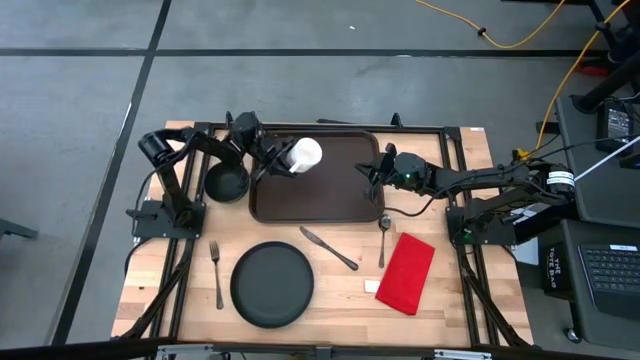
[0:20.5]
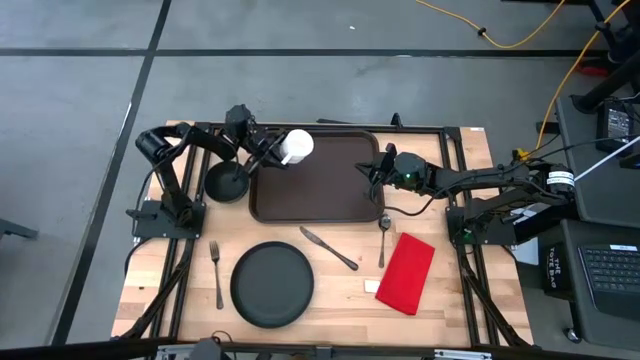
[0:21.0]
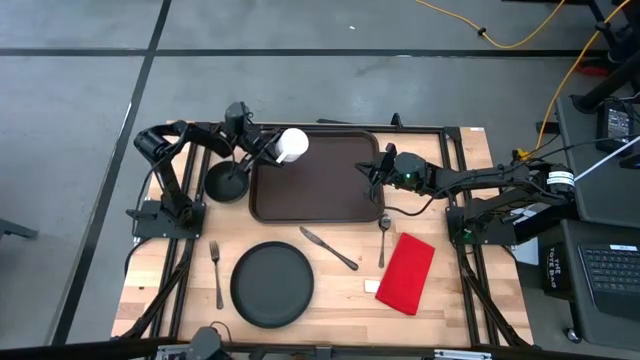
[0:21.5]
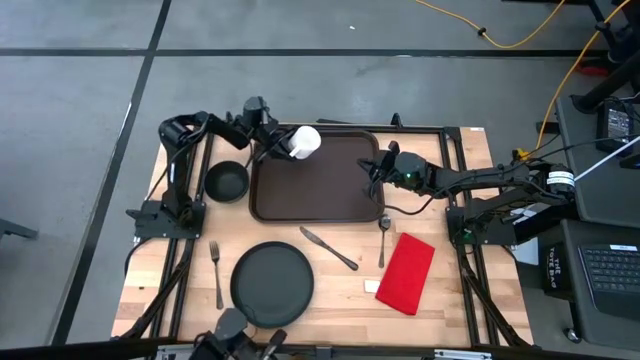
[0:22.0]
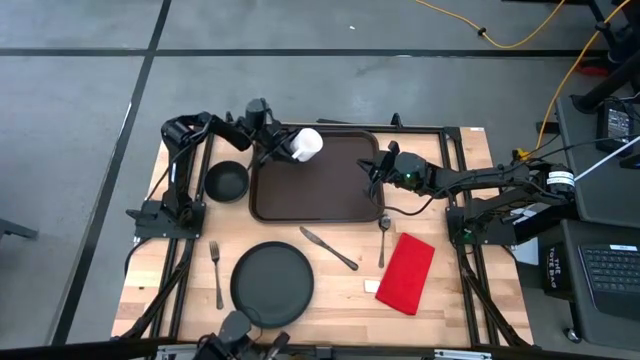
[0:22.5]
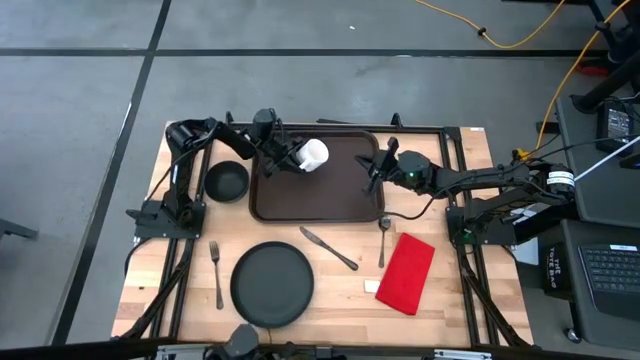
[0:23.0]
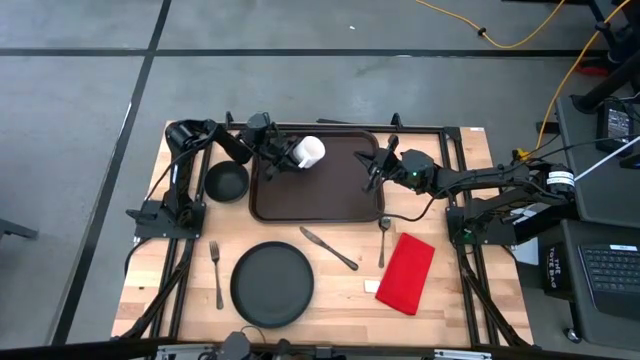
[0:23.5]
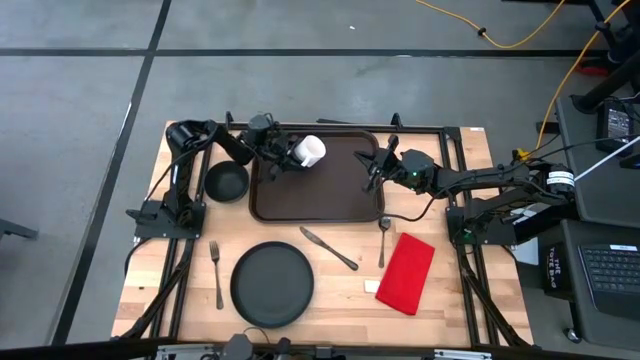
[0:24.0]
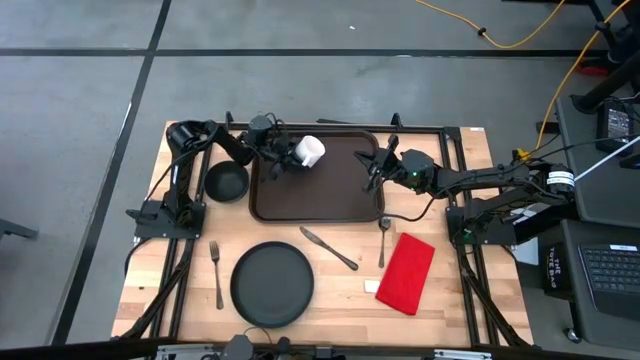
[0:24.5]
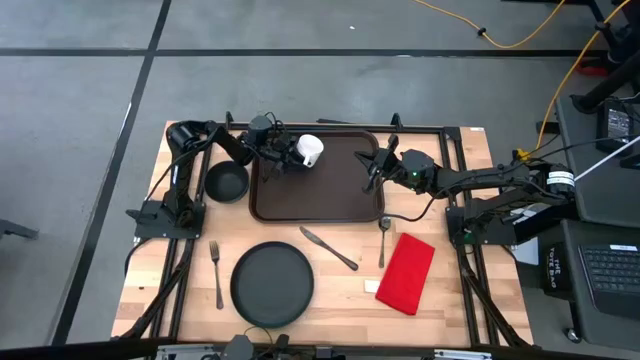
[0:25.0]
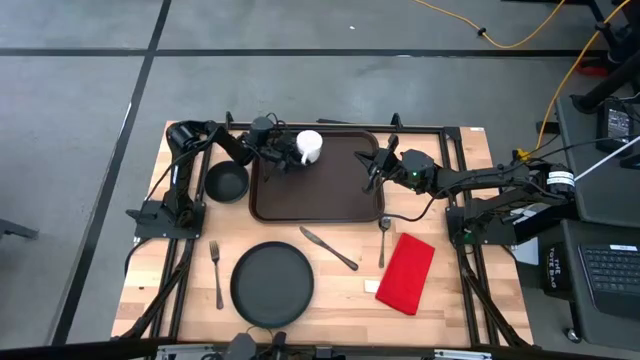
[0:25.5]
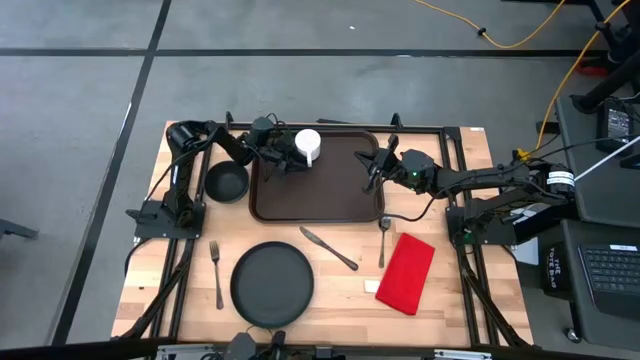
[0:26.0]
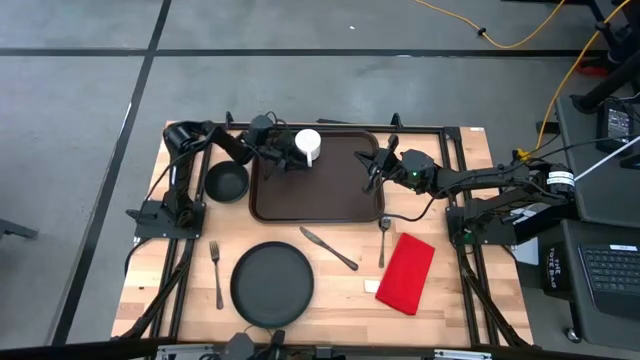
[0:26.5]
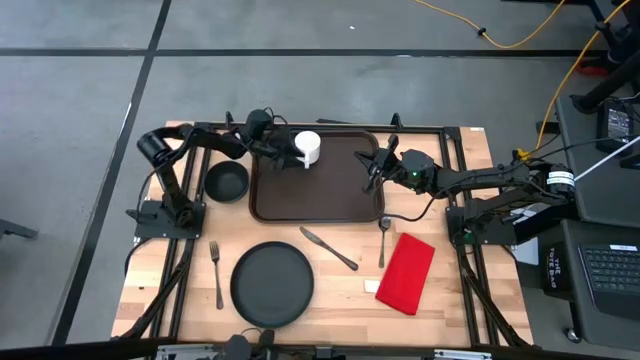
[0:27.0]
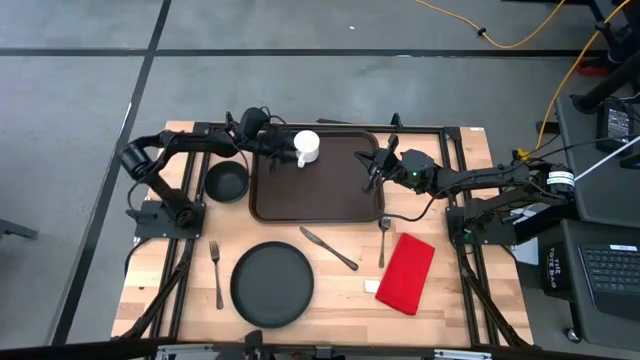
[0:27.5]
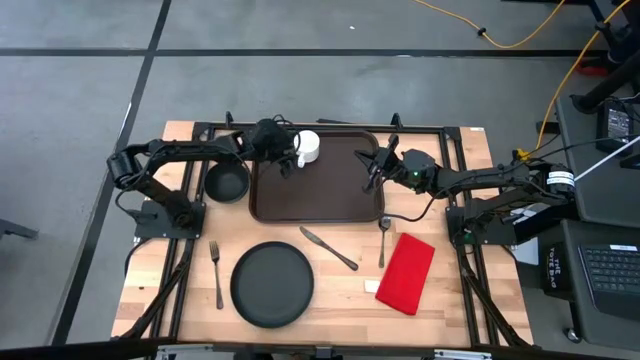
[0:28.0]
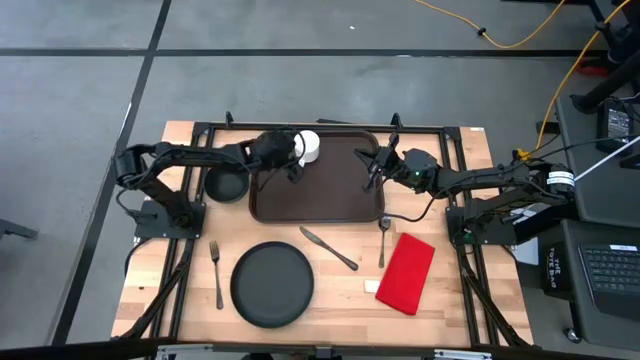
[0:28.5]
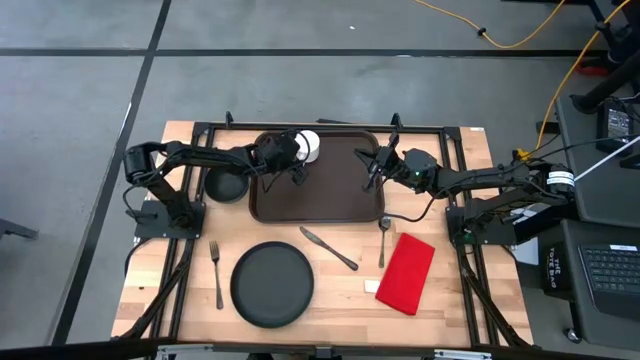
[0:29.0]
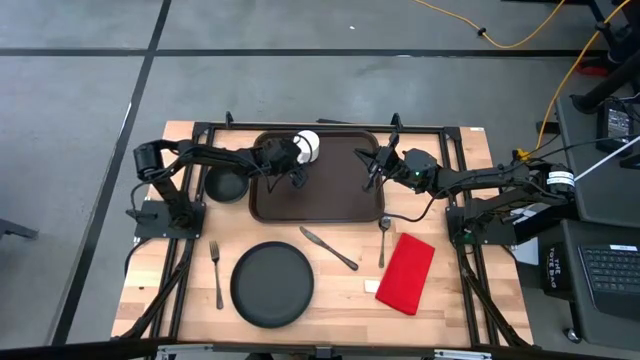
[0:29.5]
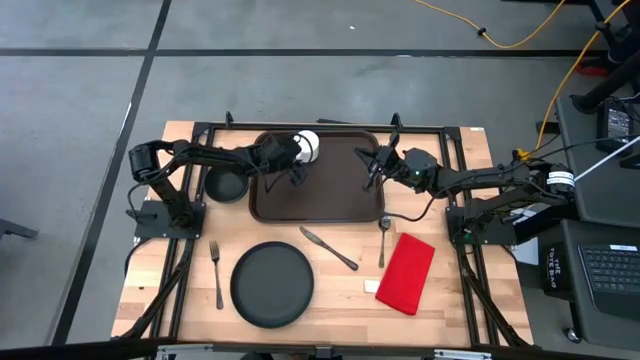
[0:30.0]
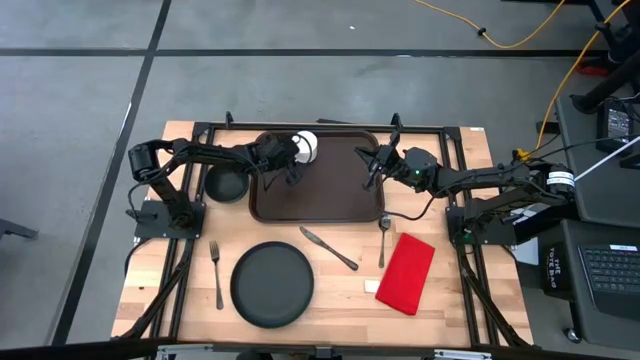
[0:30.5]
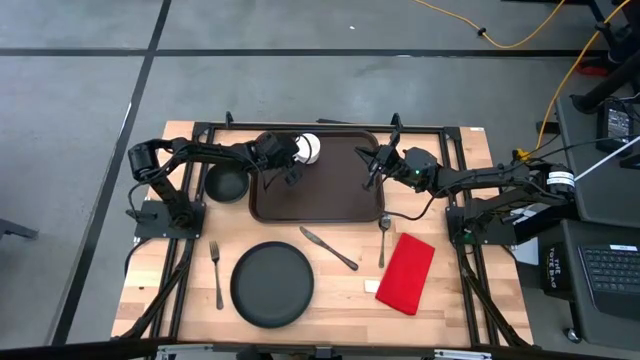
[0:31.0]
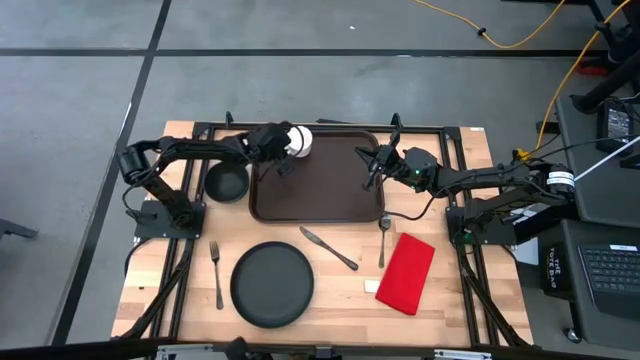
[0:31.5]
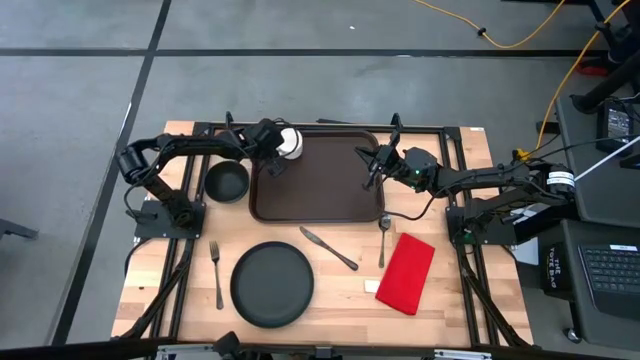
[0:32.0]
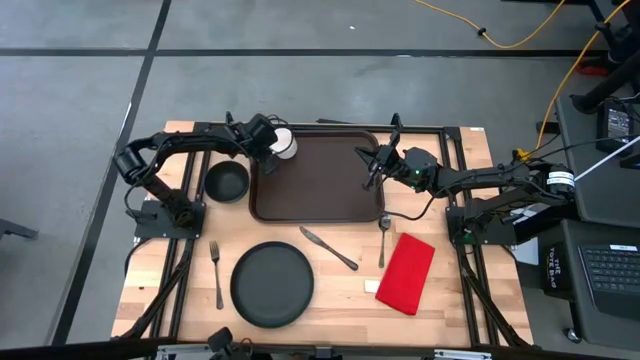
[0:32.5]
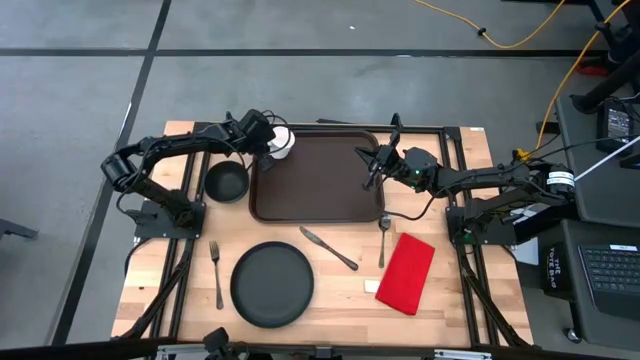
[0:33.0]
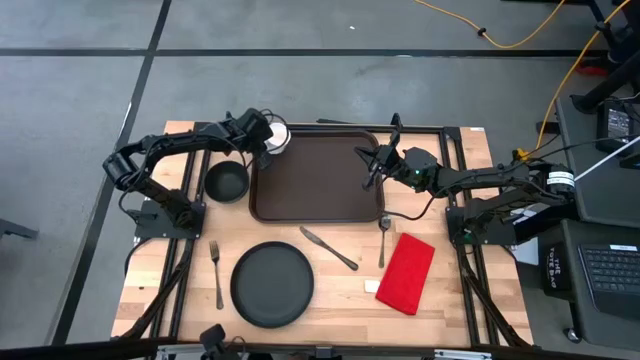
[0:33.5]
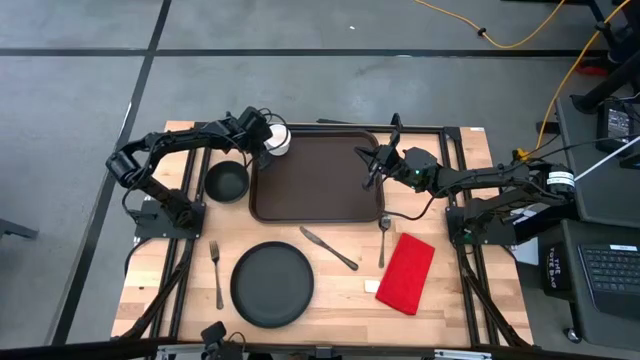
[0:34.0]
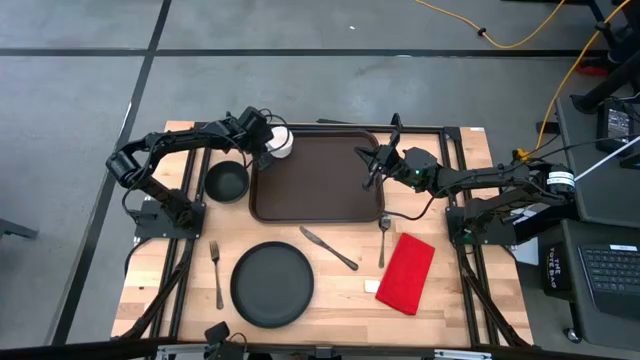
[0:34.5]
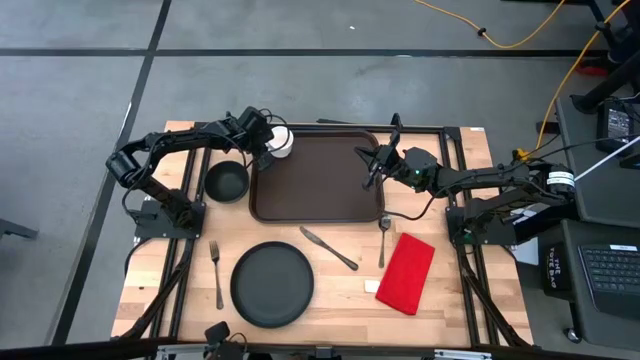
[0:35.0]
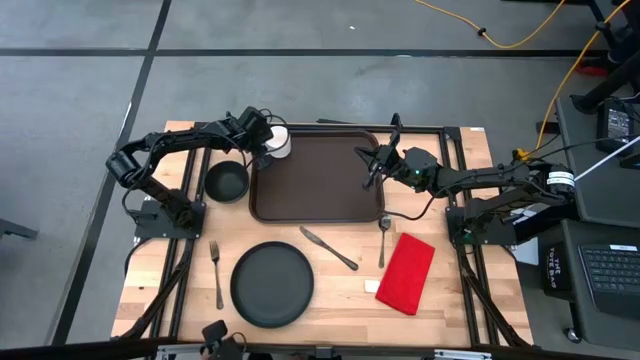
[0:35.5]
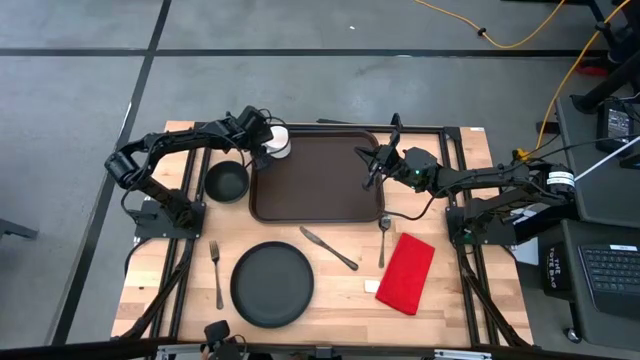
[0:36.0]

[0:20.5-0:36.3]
Task: Set up tray
Put the white mug on the brown serving tray

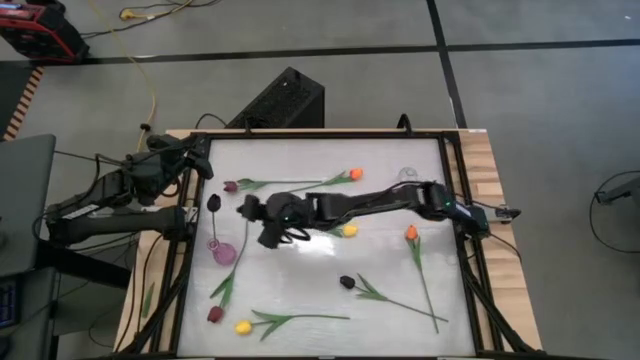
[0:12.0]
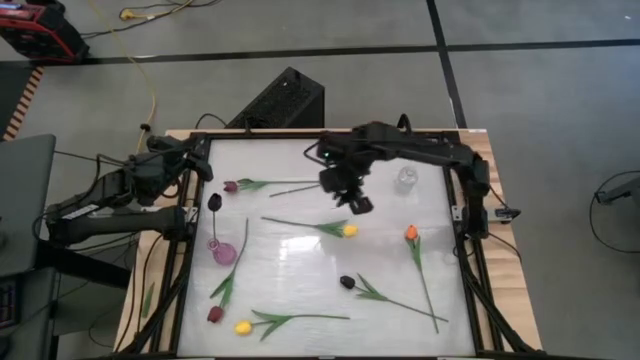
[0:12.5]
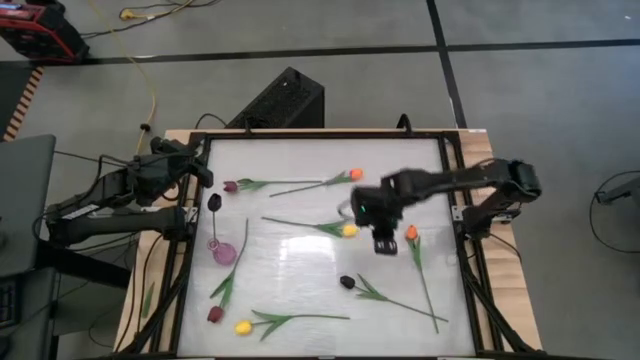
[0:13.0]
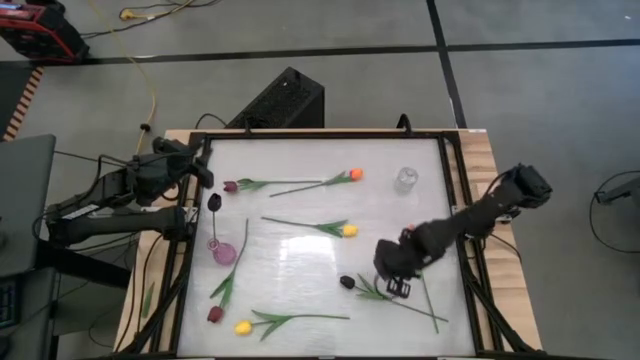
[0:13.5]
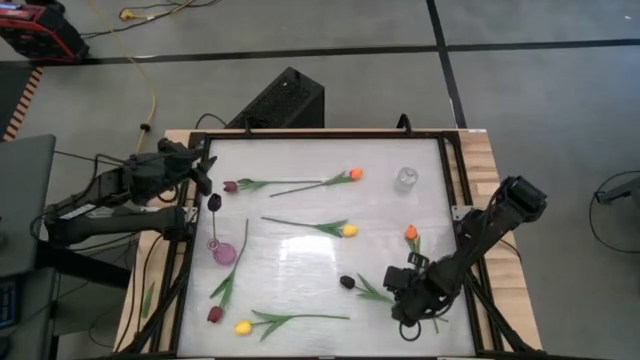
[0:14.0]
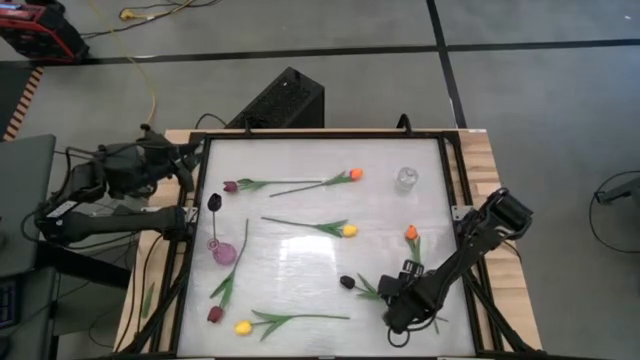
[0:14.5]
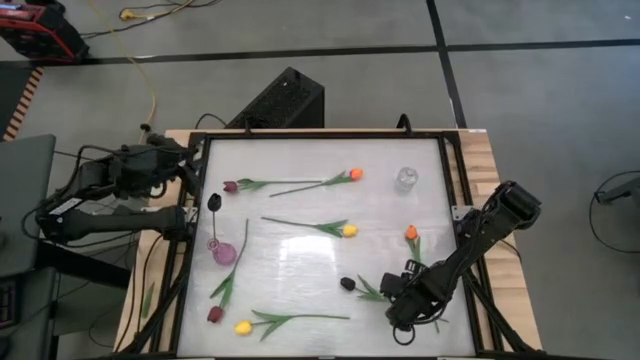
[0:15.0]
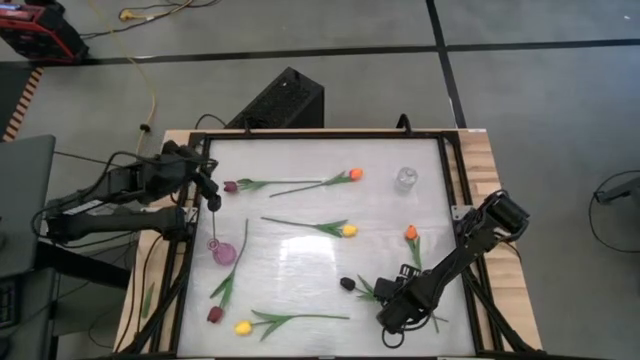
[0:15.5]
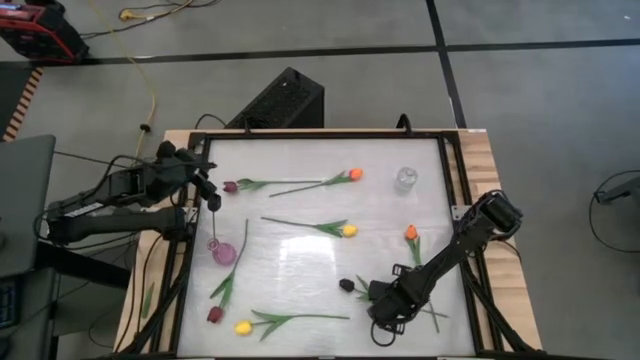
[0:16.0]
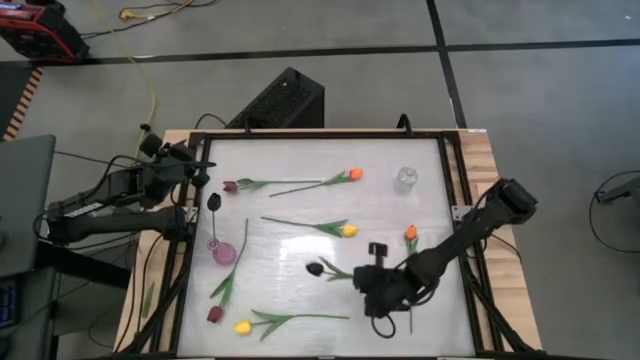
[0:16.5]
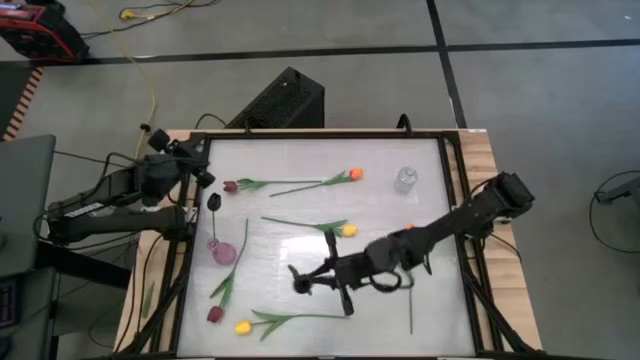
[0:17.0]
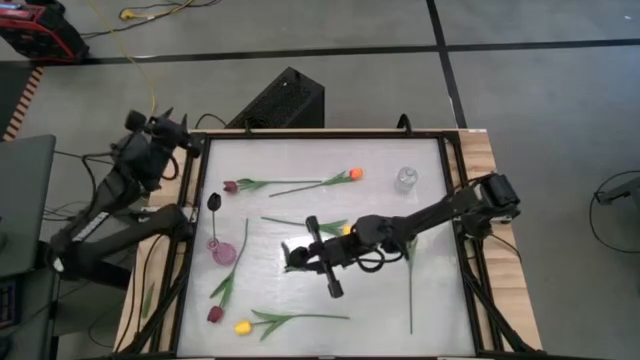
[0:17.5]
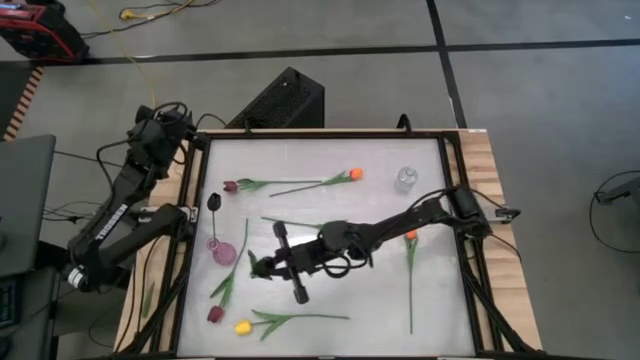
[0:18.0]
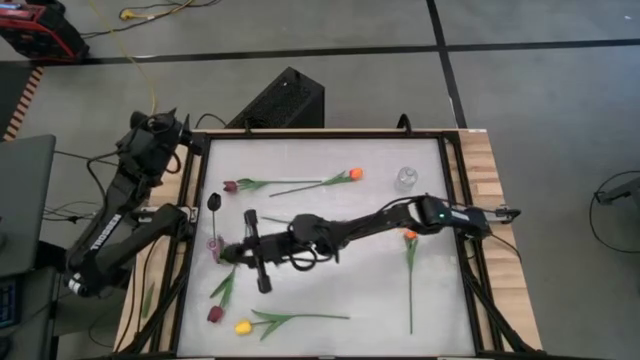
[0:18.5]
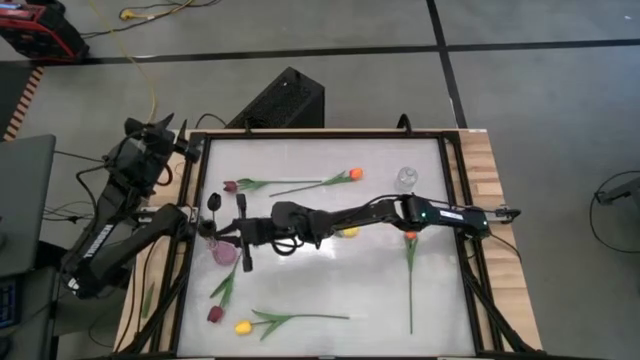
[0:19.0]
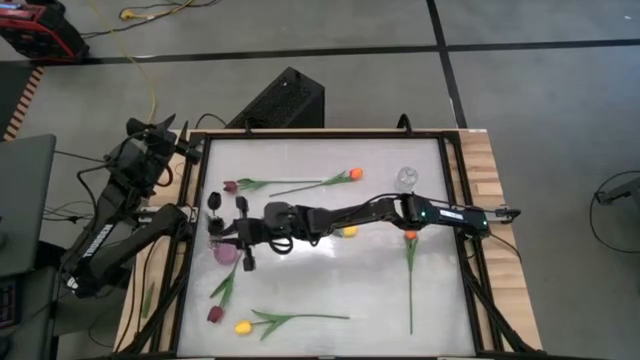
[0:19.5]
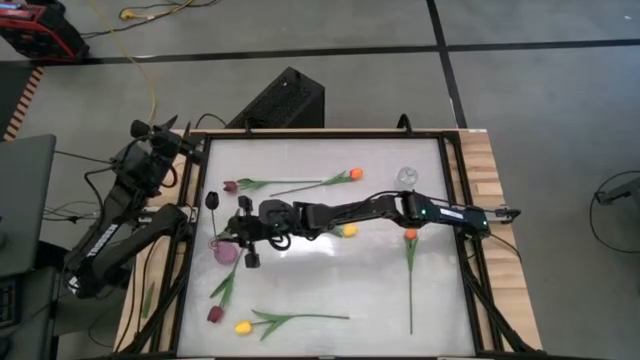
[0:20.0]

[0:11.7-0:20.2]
Task: Sort flowers into vase by color
Put the black tulip into the purple vase
